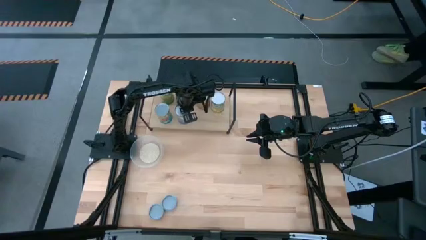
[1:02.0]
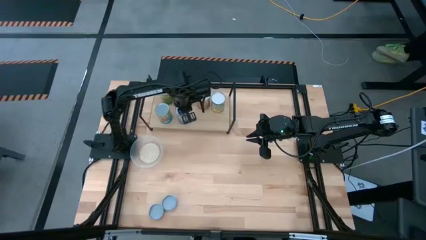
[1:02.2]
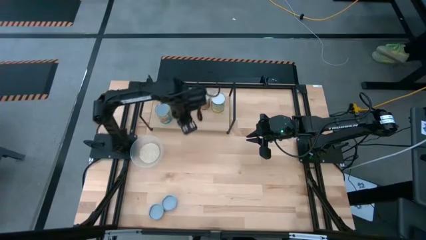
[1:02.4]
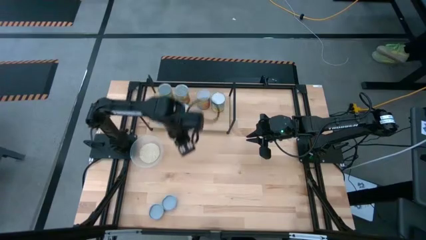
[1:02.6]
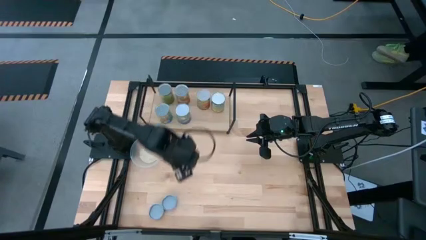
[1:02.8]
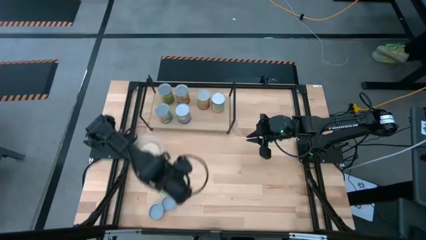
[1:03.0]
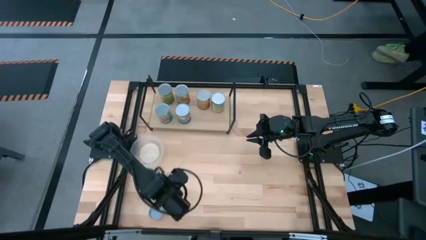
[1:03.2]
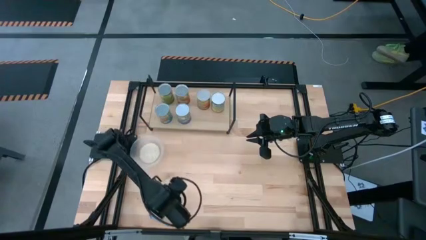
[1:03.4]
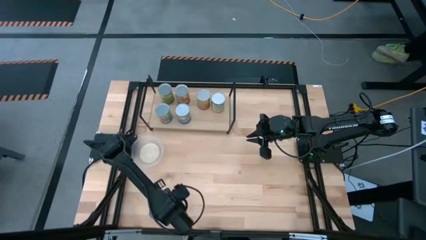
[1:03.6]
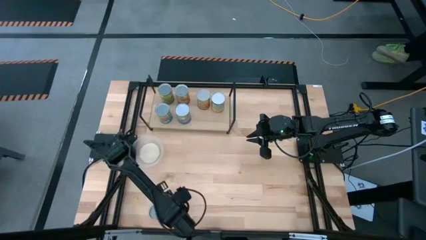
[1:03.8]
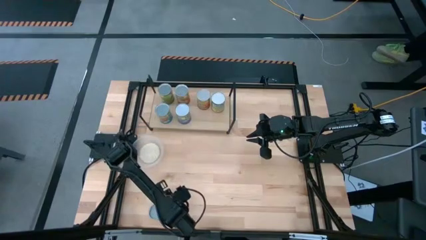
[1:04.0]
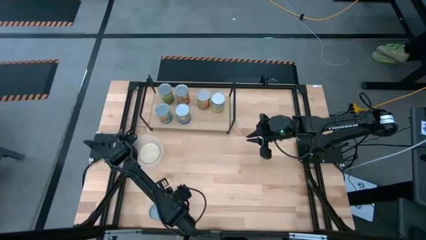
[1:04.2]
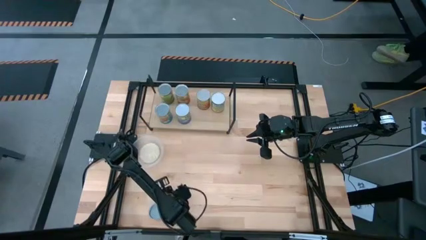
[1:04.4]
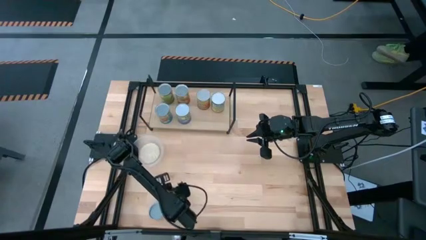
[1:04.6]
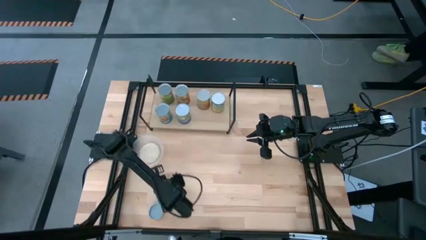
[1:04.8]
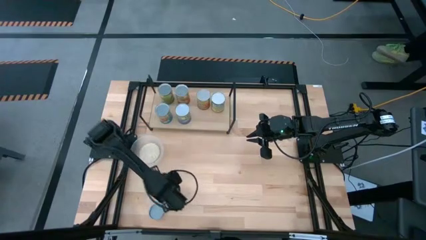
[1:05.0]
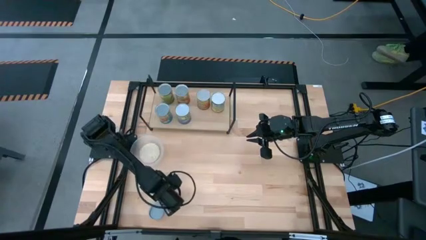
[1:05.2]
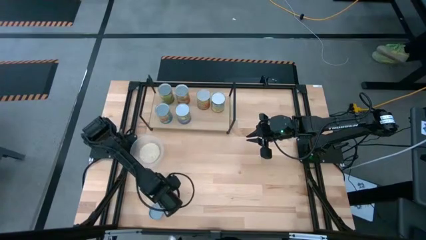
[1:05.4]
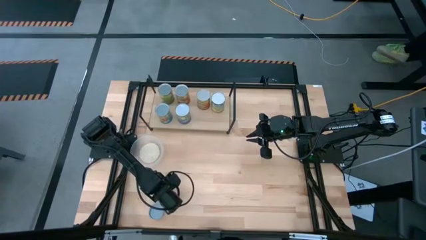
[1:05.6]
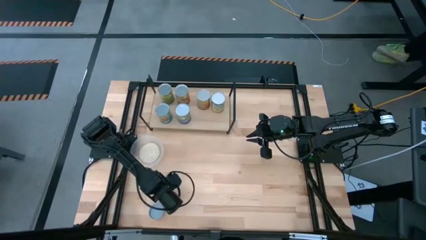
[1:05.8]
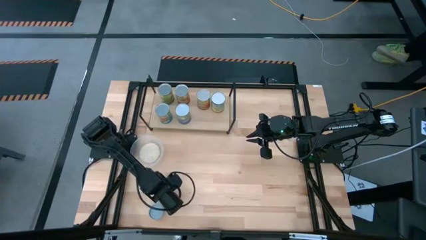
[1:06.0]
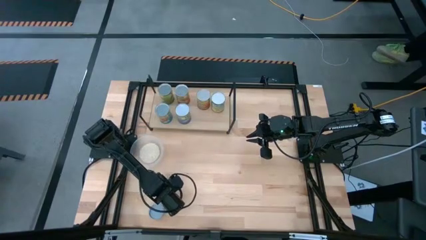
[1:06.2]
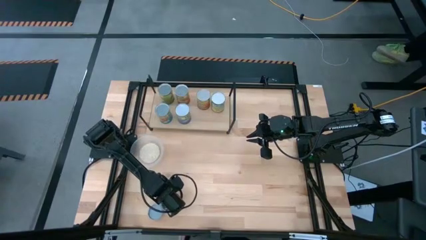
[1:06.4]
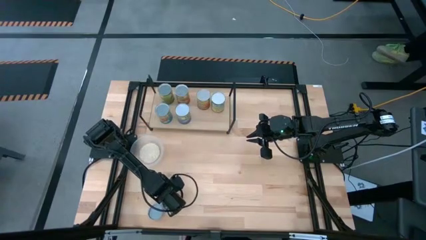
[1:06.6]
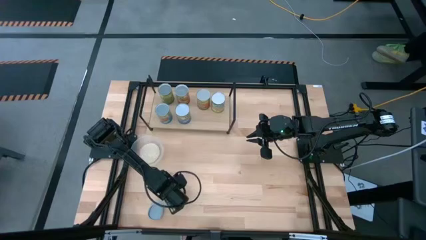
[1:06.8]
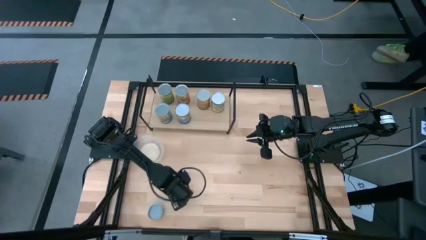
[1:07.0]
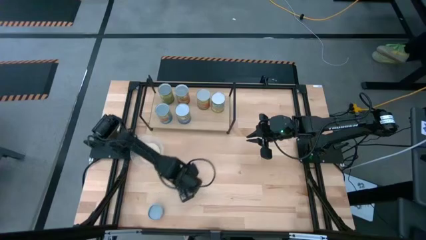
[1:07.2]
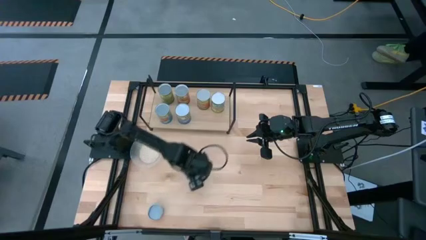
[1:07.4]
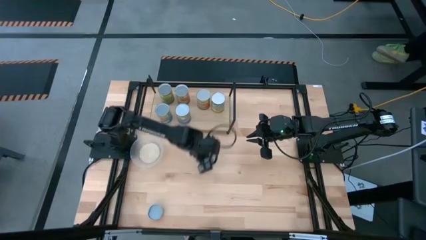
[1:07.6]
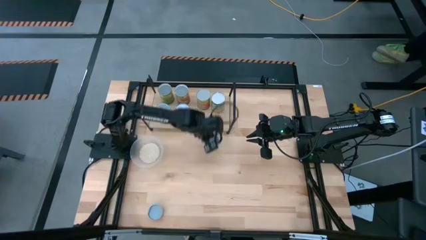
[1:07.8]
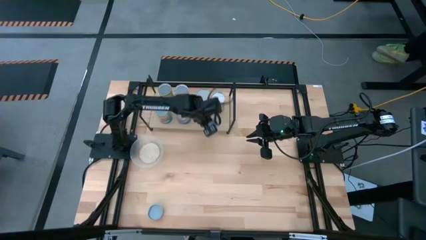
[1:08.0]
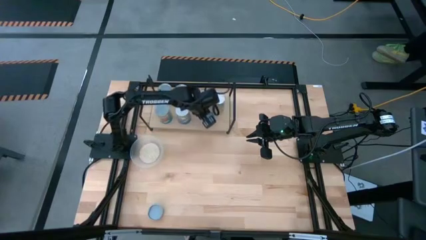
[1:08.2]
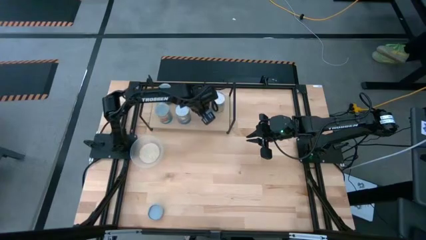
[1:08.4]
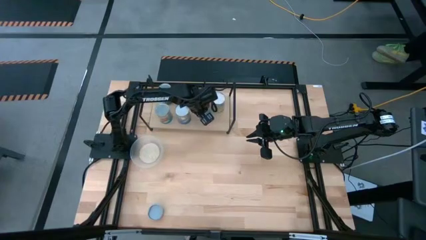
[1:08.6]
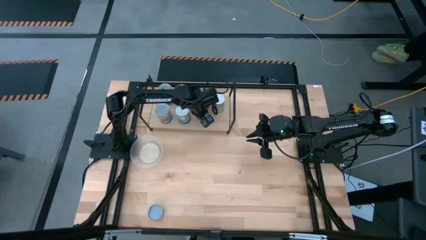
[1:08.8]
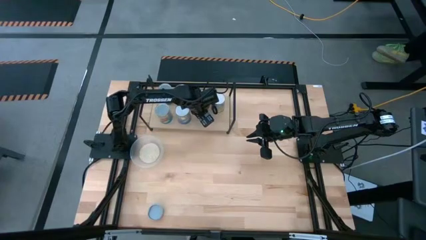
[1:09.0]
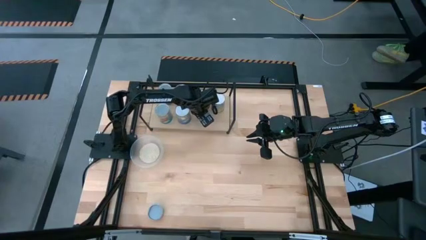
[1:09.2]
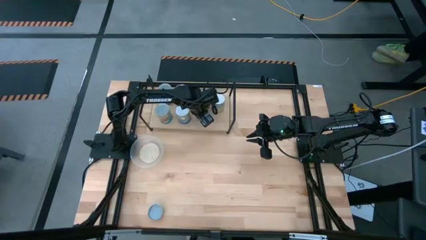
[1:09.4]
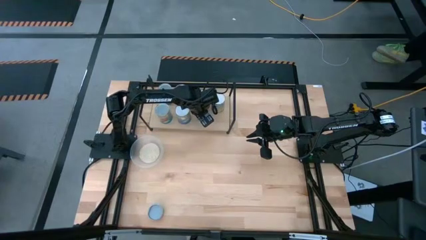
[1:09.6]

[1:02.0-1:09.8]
Task: Pick and place cans onto a shelf
Put the salmons can on the shelf

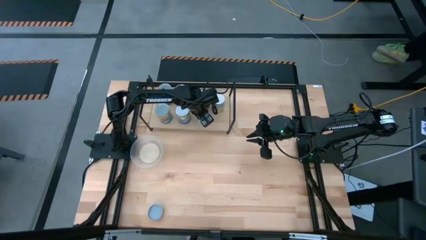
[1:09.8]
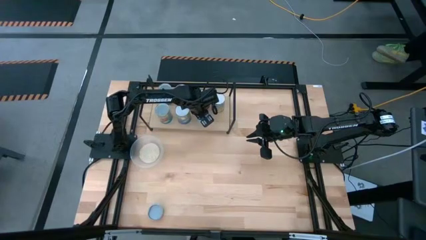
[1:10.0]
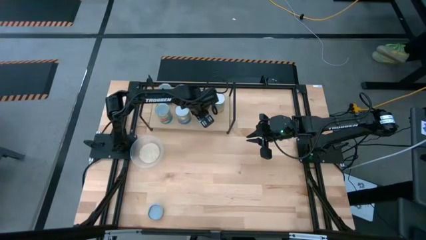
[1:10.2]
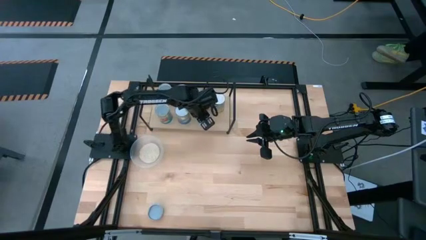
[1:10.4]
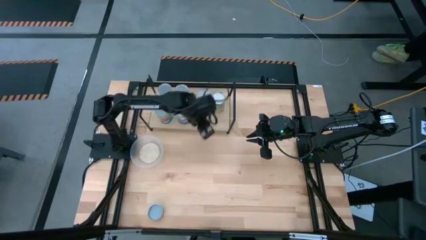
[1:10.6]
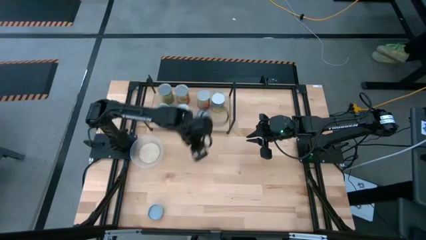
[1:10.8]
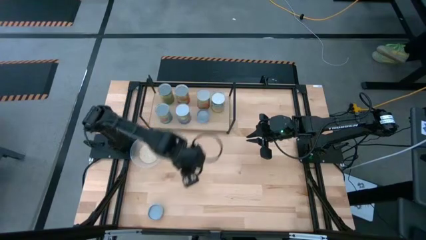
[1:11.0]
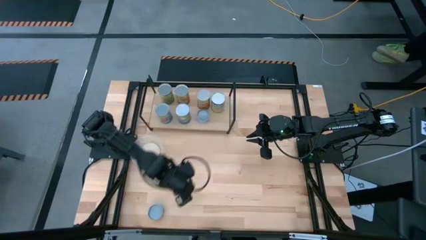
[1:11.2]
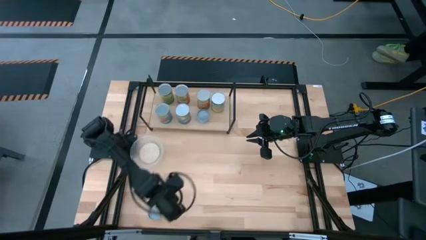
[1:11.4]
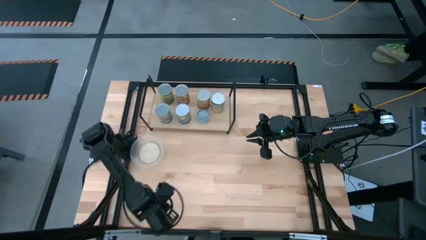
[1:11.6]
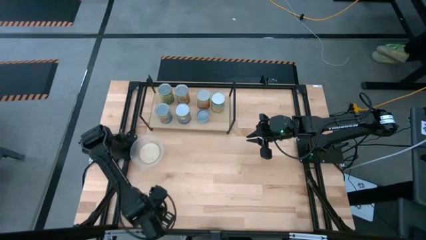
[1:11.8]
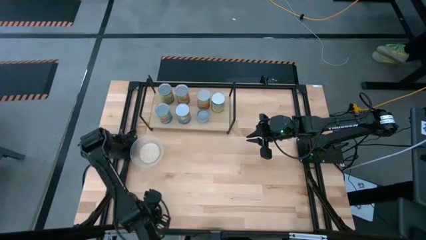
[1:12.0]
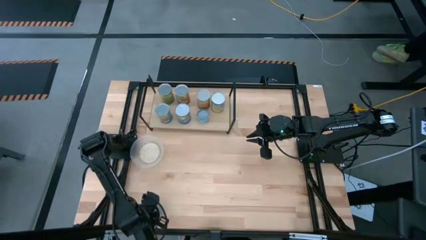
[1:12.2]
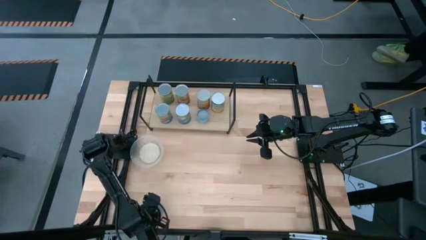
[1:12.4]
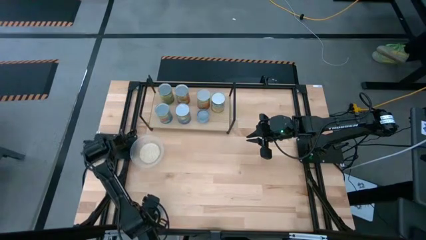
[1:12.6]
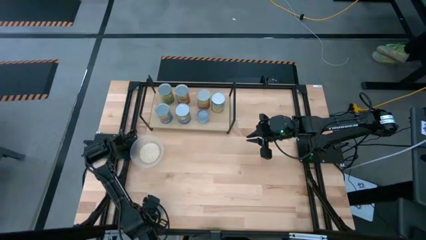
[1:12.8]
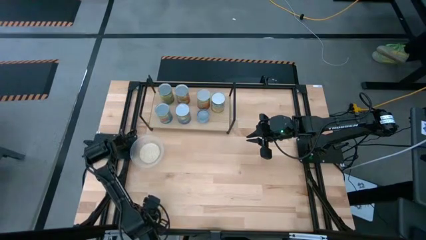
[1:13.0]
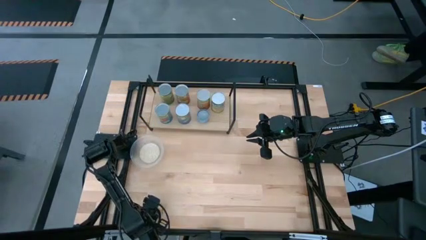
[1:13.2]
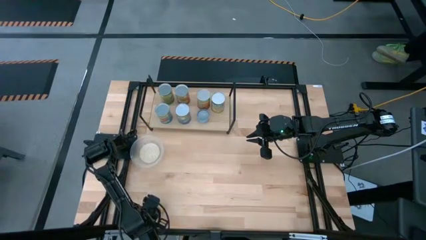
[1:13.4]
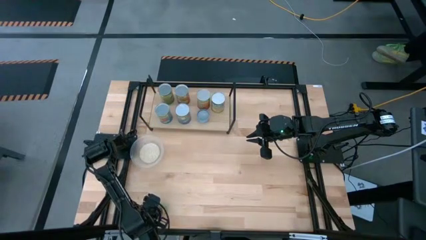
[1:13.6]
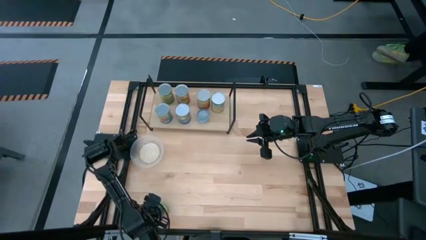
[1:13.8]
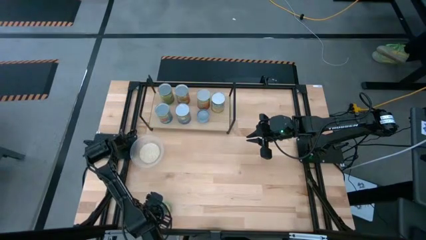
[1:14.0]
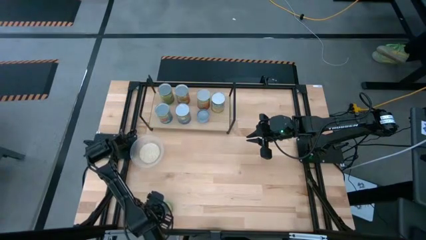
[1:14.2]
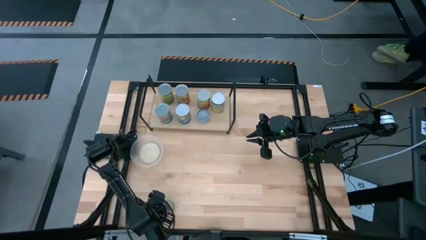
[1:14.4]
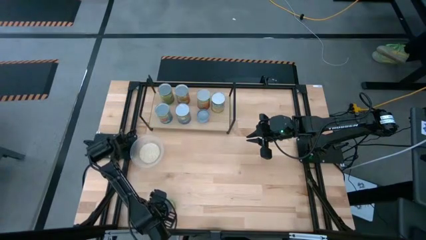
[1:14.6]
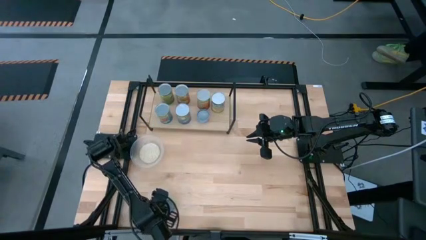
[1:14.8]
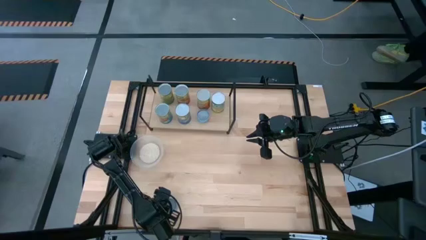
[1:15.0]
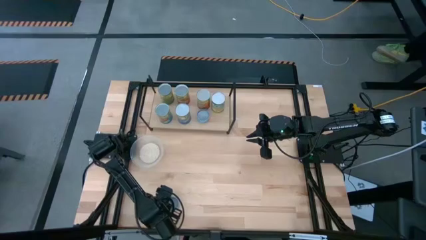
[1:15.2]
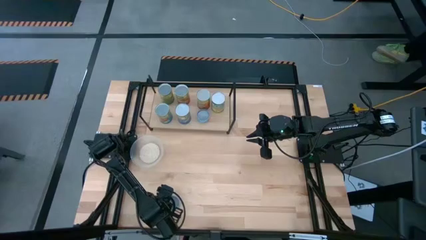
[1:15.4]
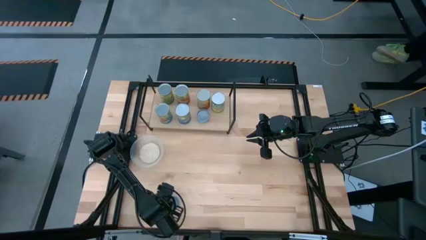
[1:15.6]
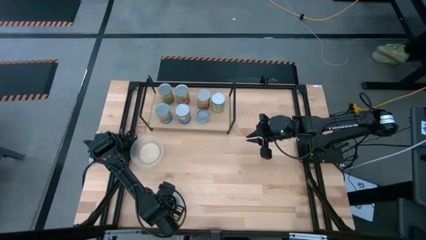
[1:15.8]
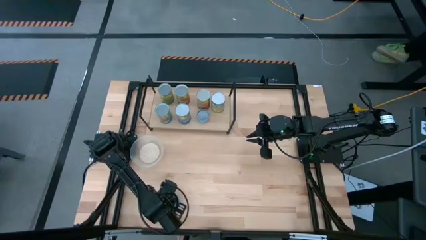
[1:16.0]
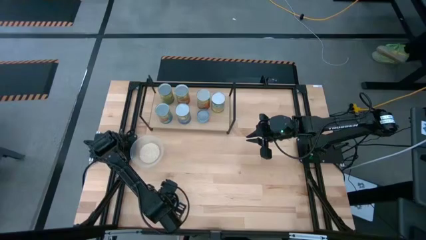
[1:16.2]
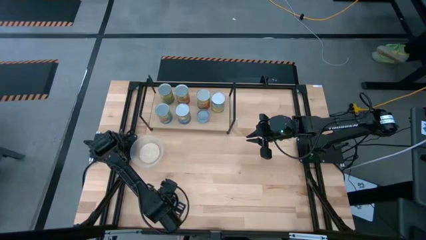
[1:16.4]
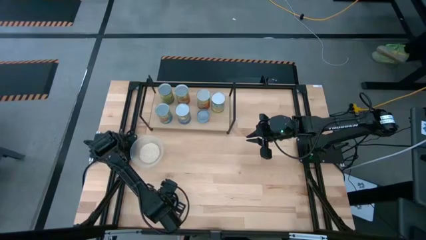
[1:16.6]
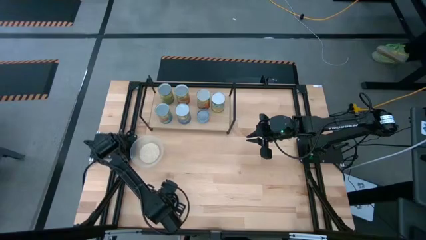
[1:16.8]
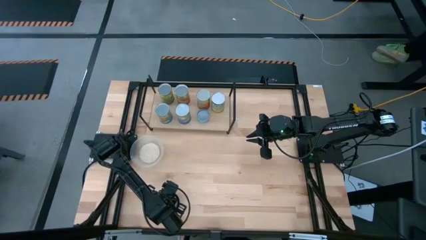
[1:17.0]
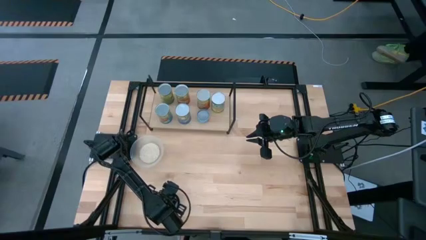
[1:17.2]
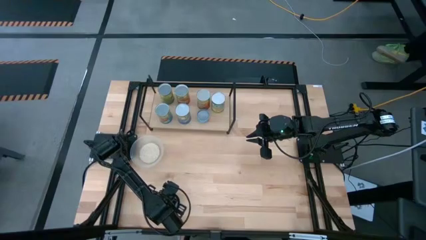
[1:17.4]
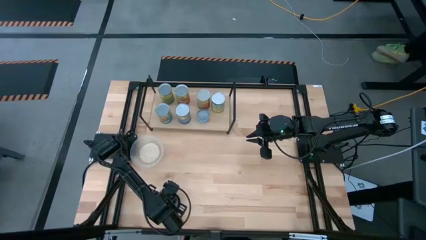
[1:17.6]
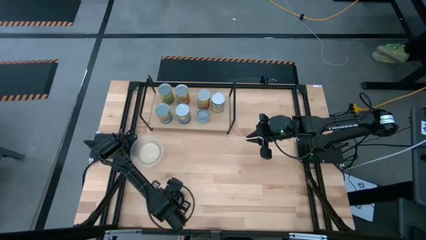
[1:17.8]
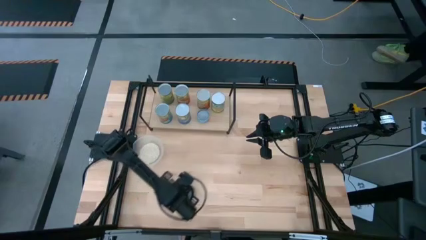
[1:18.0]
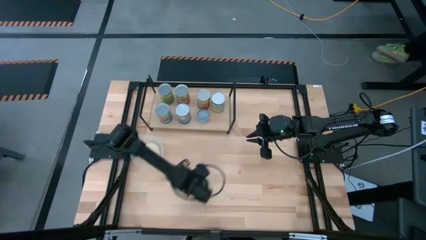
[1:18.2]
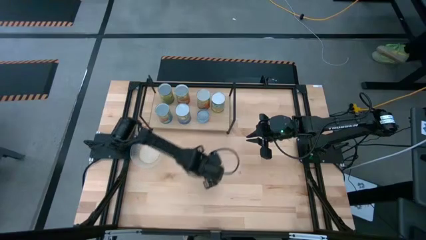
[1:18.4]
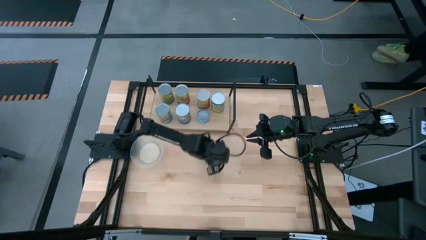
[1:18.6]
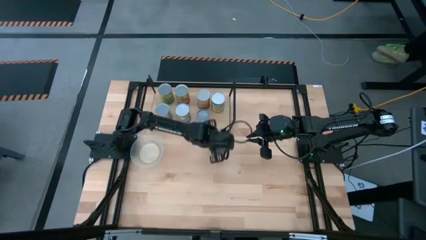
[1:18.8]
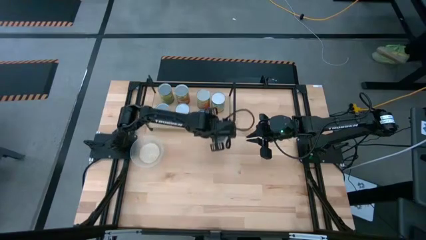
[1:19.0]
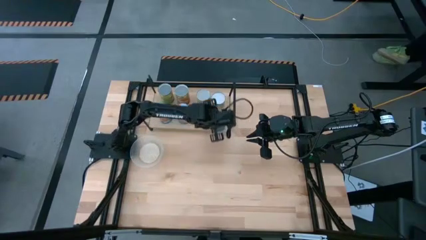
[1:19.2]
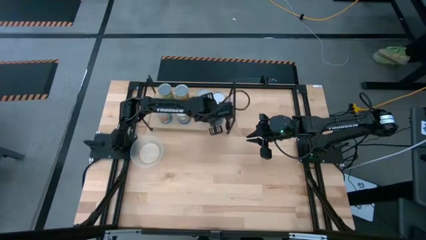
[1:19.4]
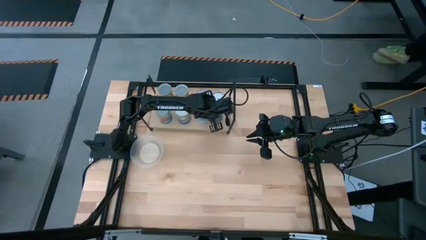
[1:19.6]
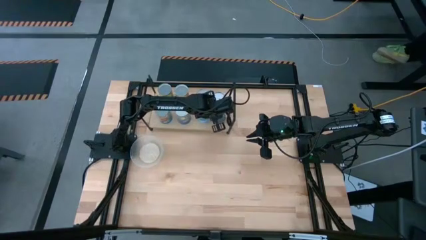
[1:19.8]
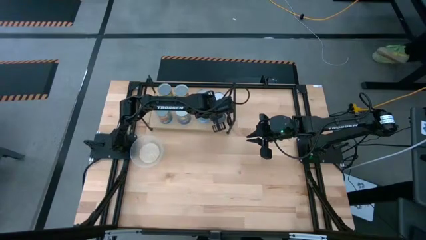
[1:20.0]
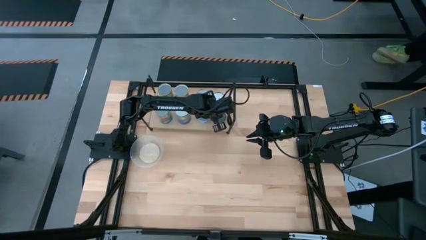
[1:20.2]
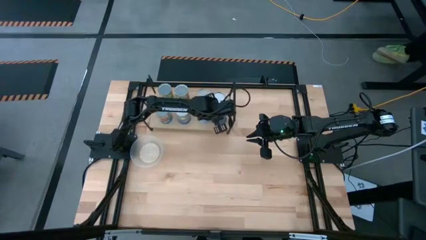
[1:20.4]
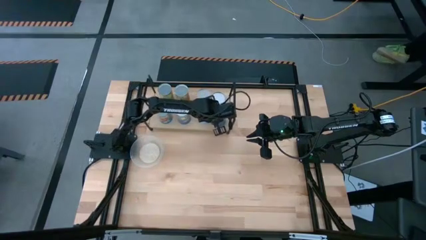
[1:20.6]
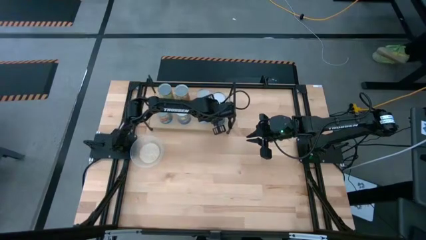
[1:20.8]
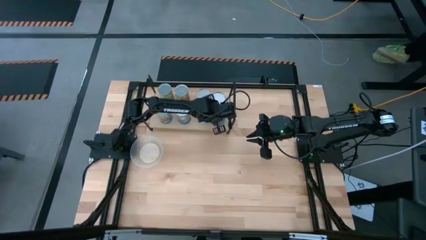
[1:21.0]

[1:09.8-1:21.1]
Put the mushroom can on the shelf
